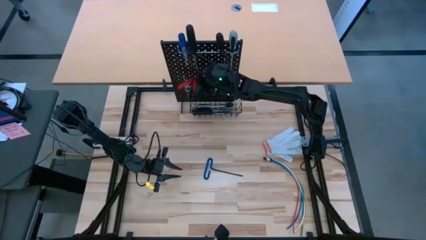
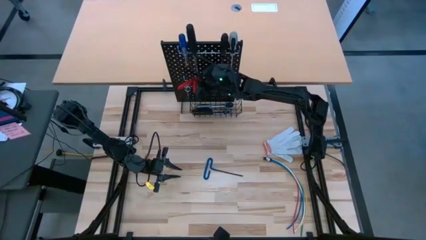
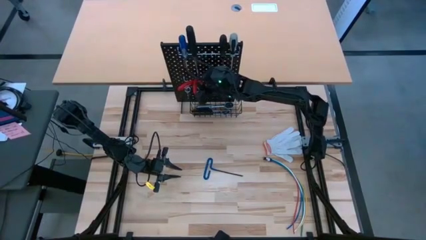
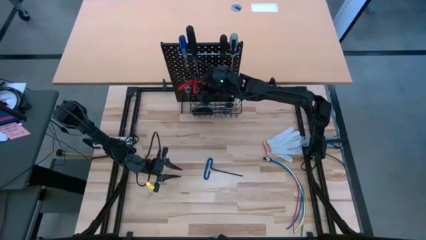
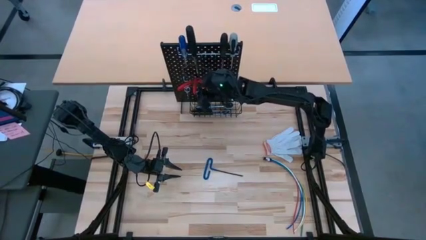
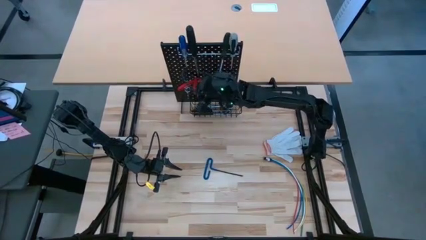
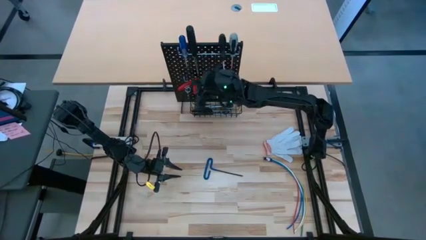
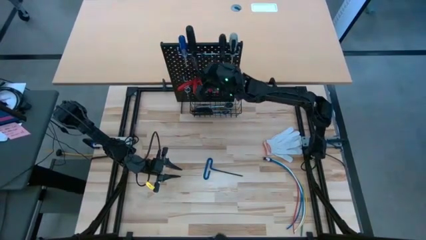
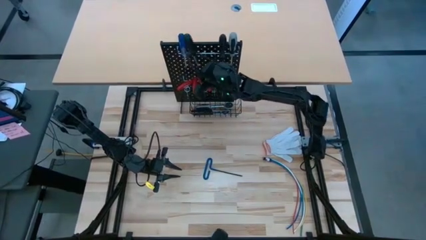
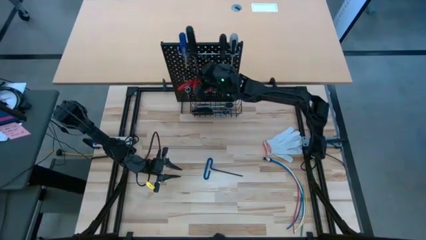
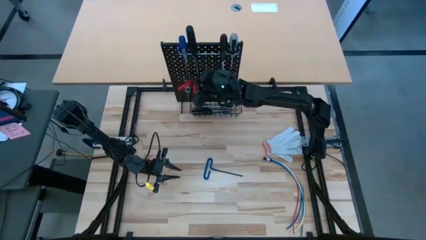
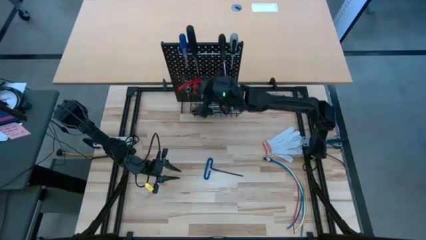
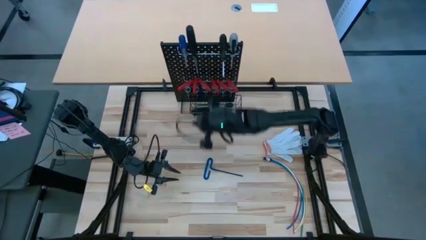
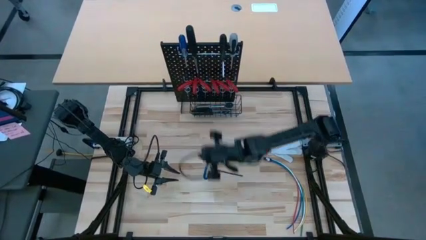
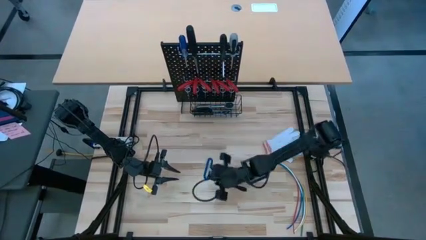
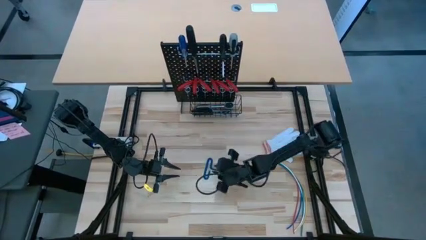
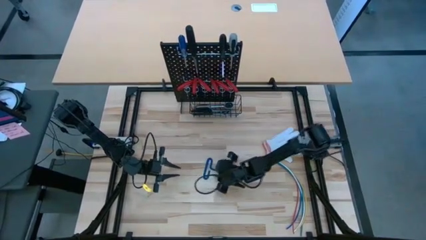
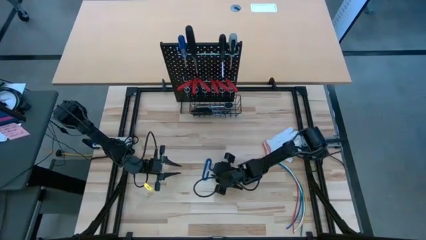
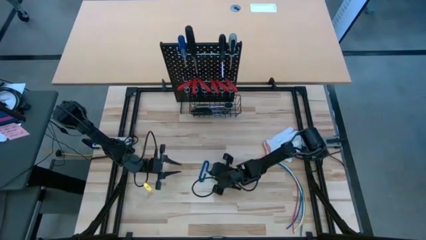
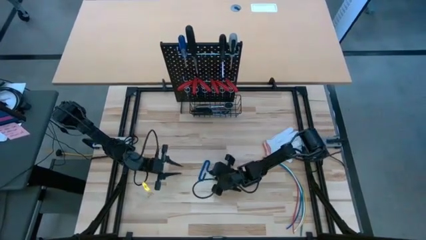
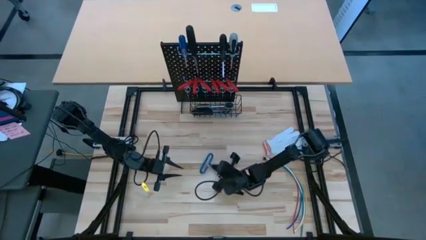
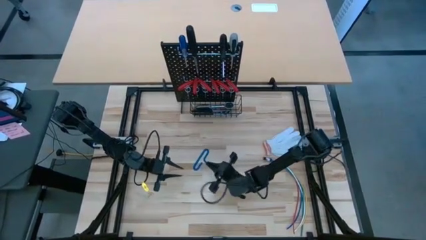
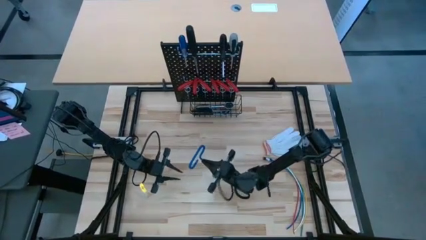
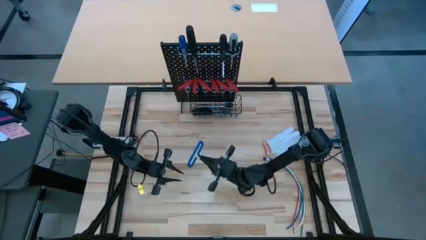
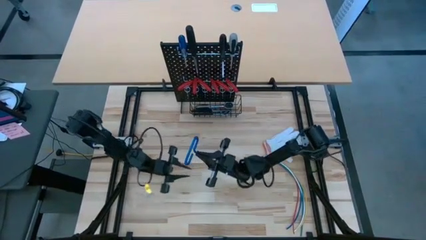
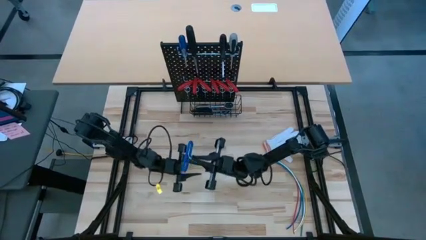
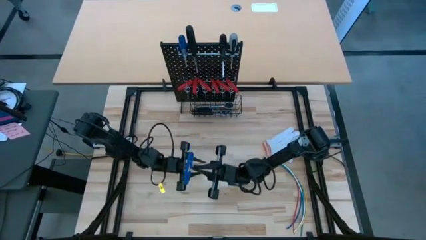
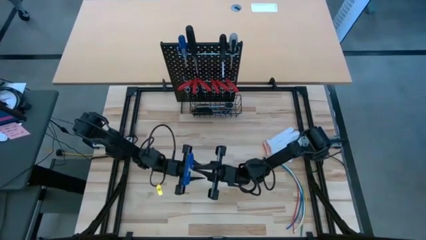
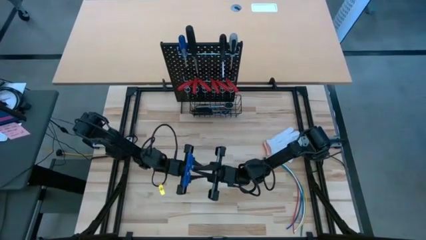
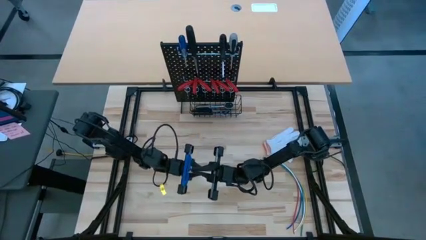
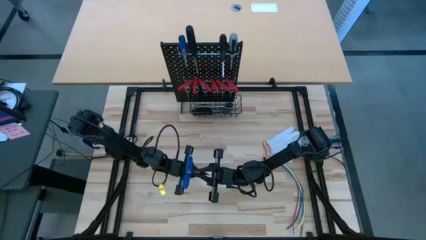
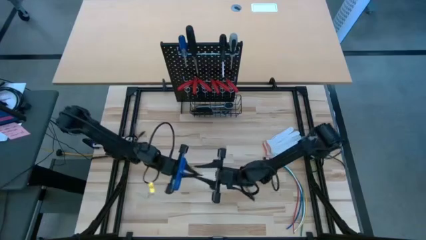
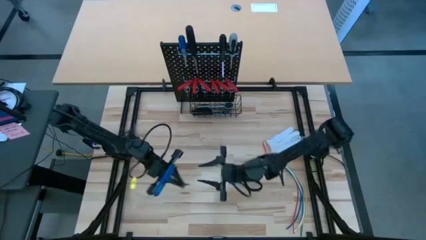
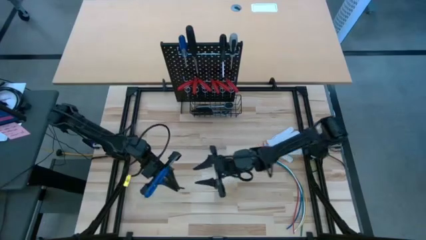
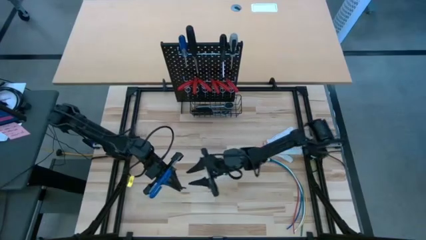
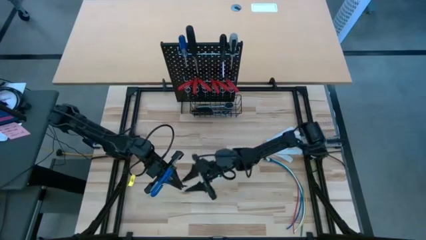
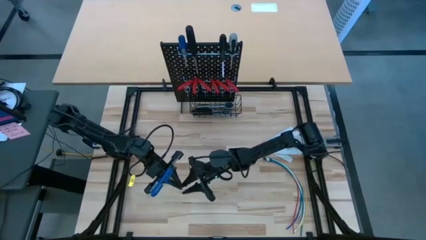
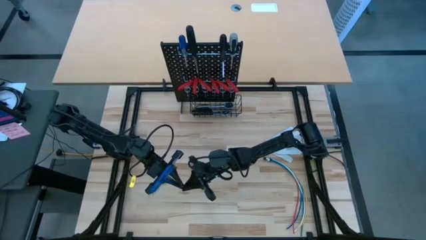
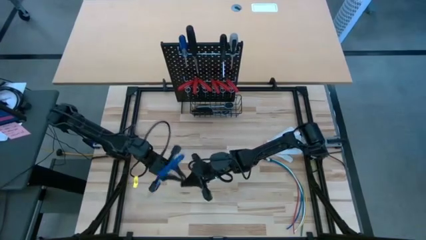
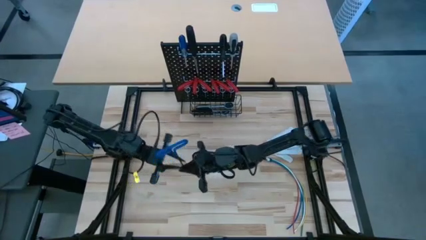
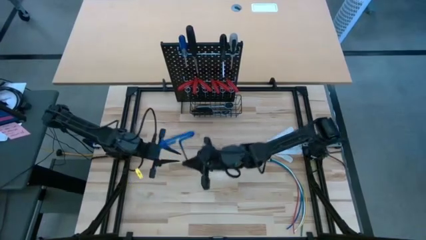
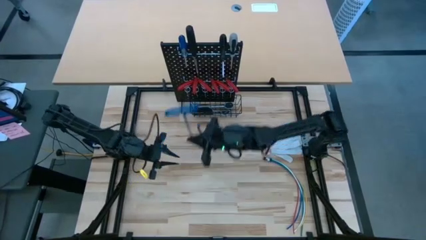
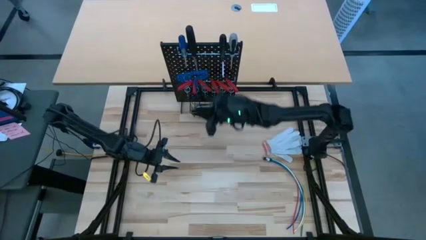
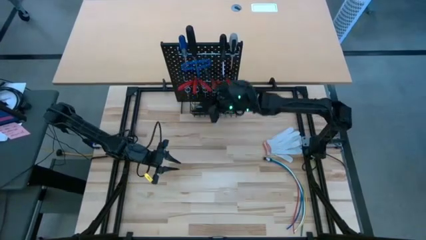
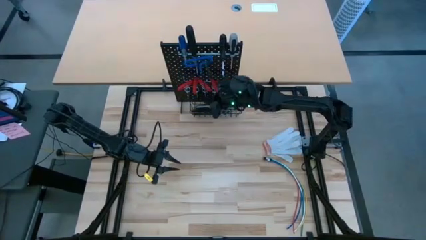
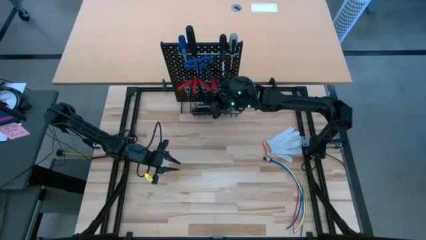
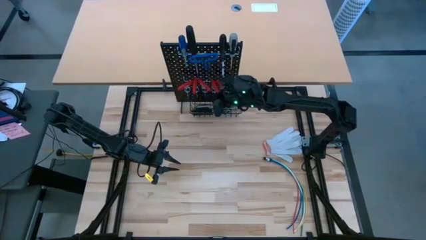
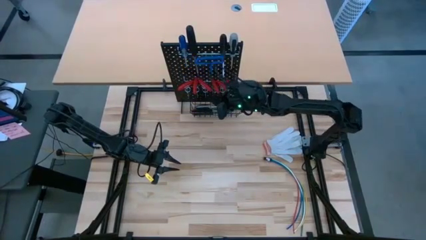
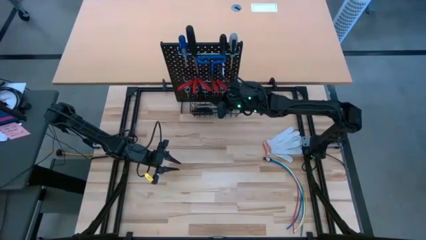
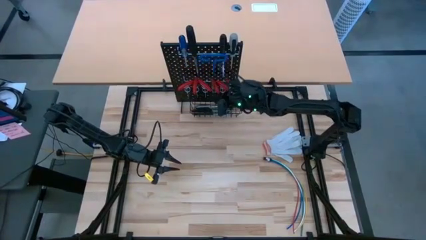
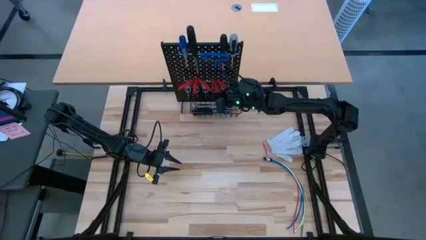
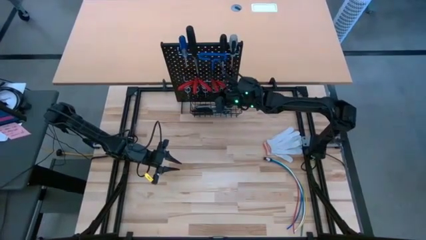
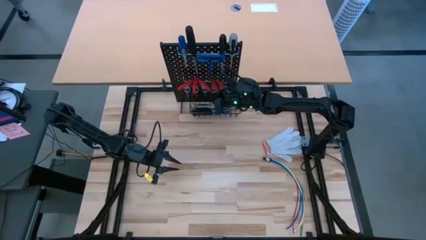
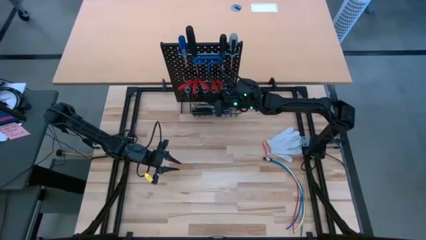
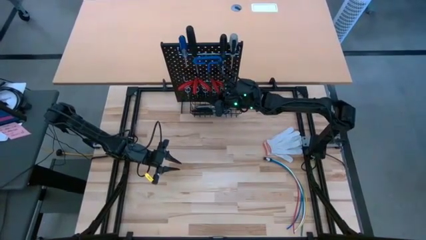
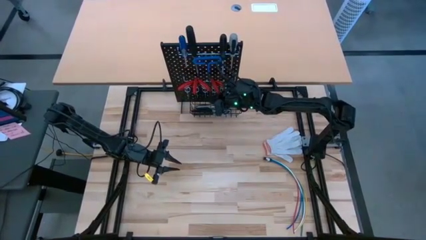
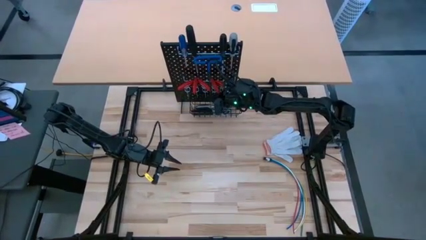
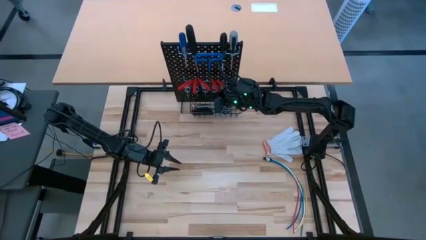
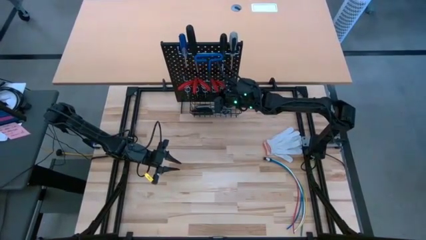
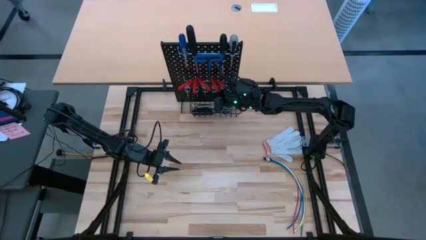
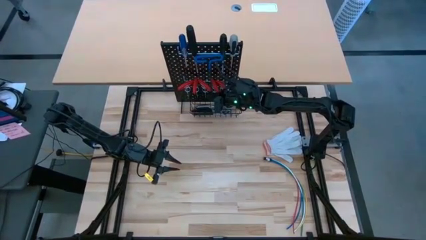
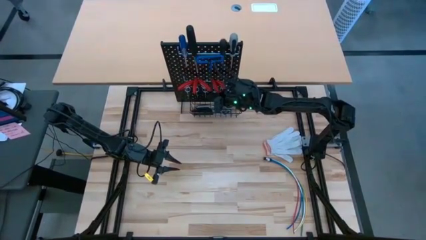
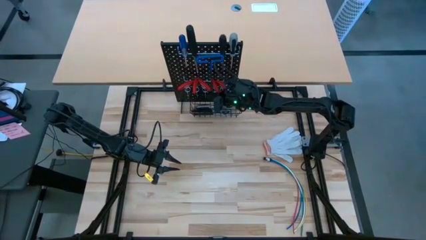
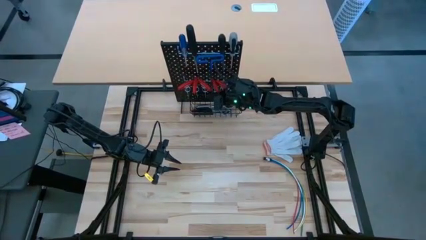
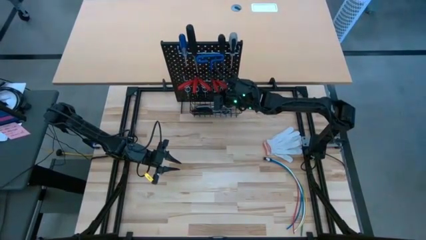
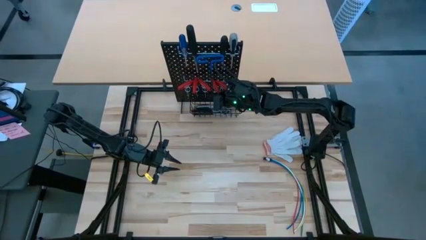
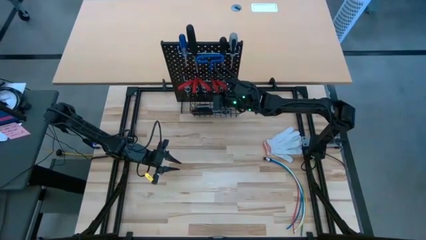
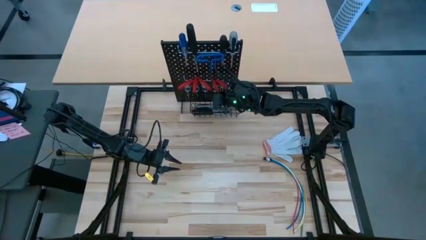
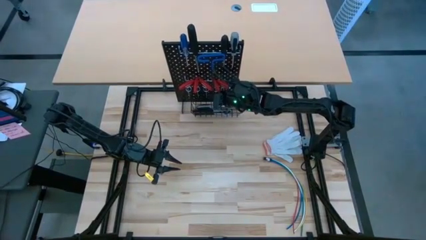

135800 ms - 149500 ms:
Task: Hang tools onto peg board
Hang the blue pick tool on the pegboard
